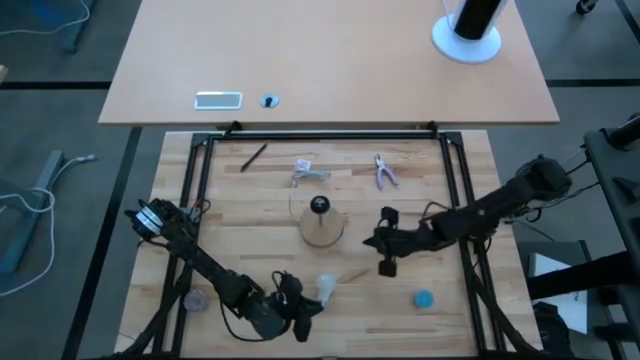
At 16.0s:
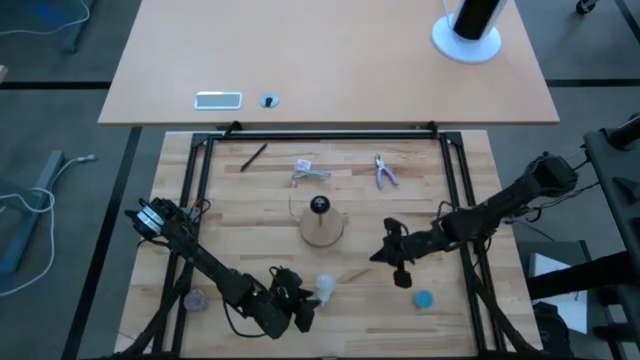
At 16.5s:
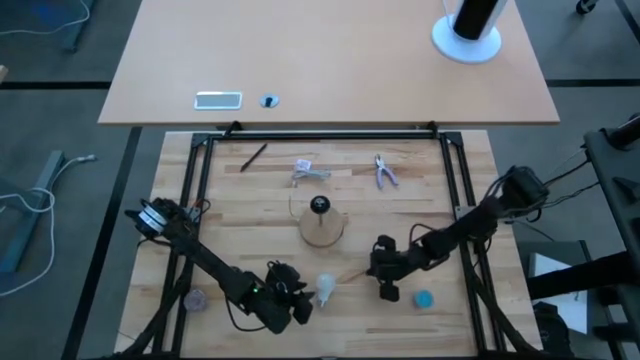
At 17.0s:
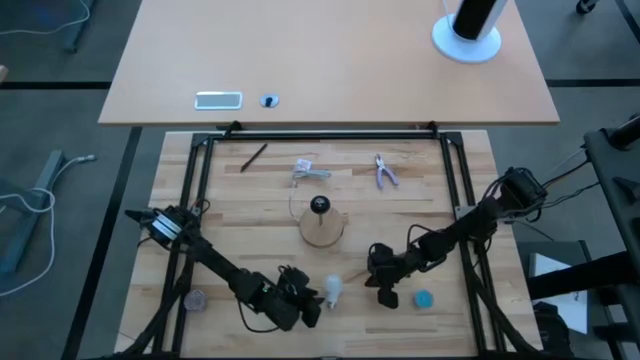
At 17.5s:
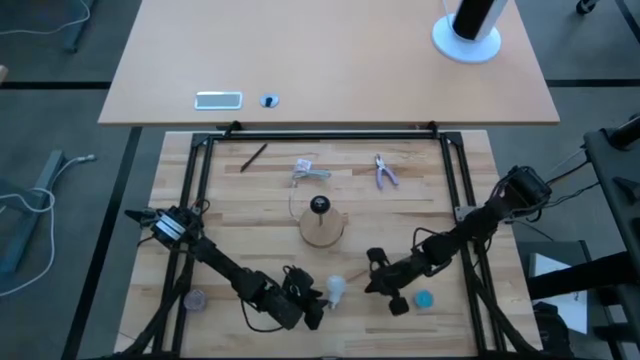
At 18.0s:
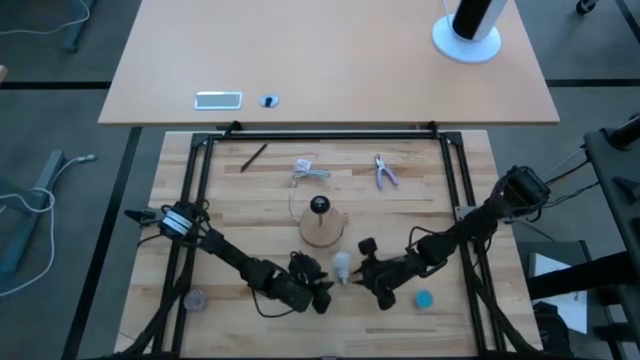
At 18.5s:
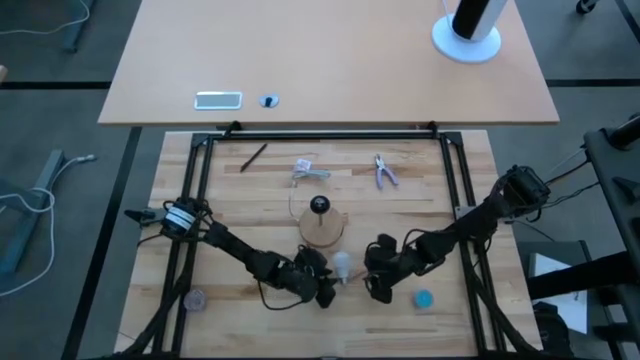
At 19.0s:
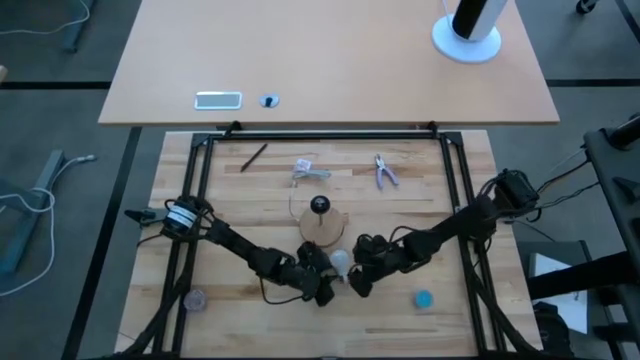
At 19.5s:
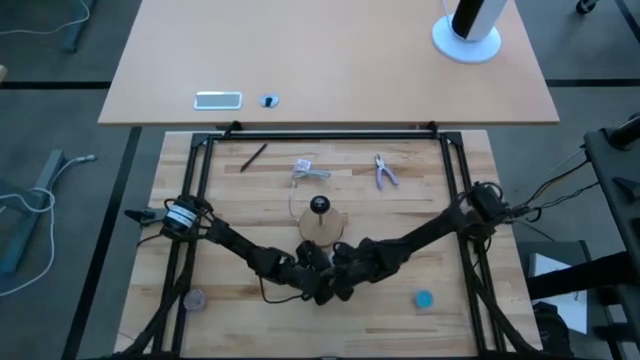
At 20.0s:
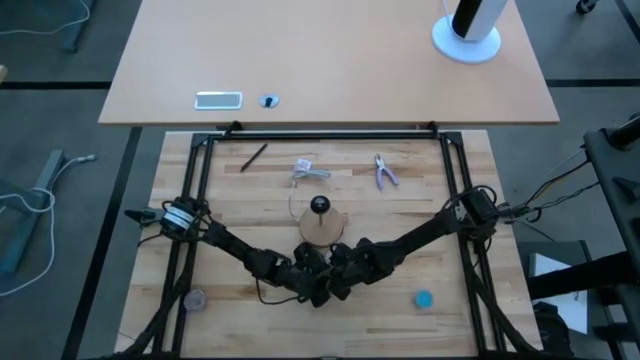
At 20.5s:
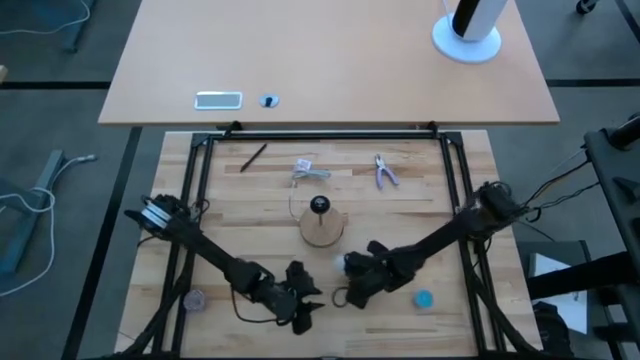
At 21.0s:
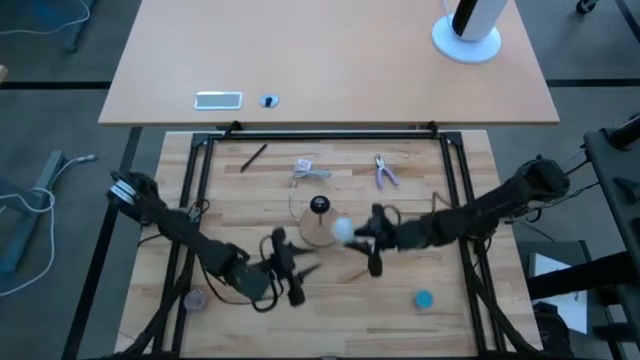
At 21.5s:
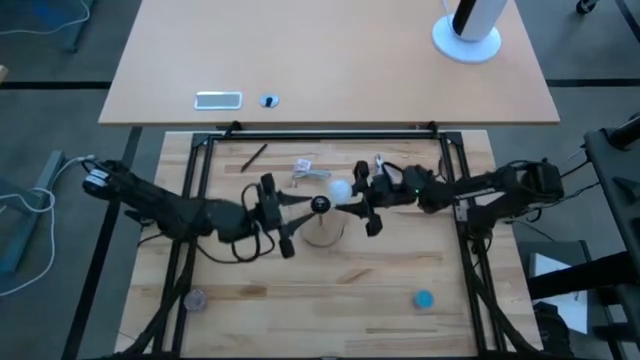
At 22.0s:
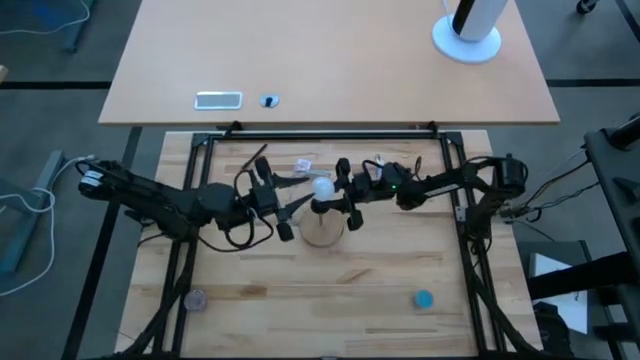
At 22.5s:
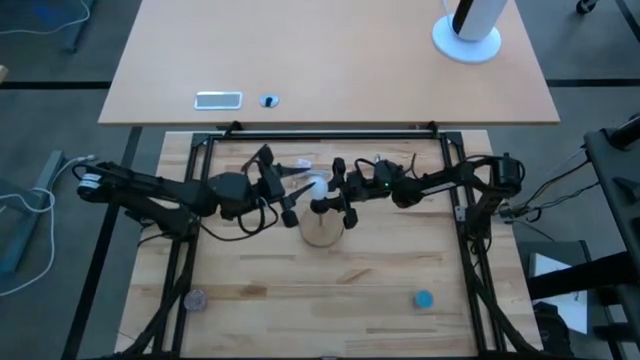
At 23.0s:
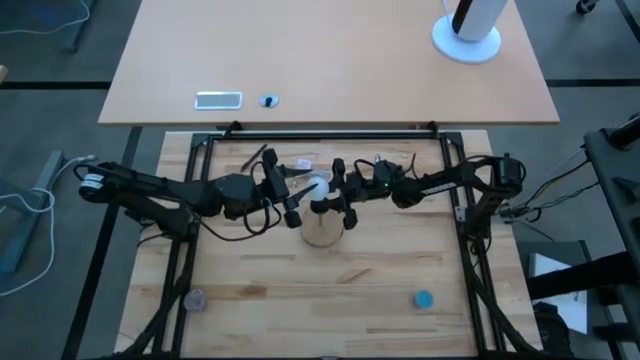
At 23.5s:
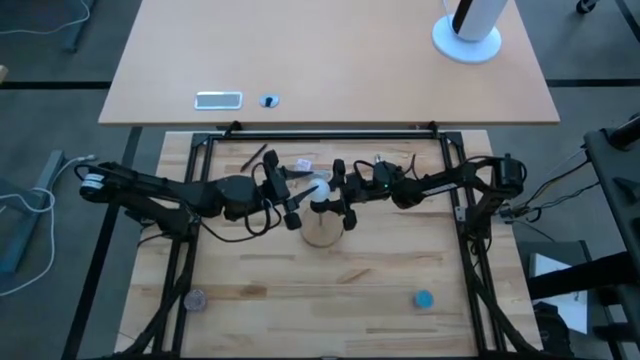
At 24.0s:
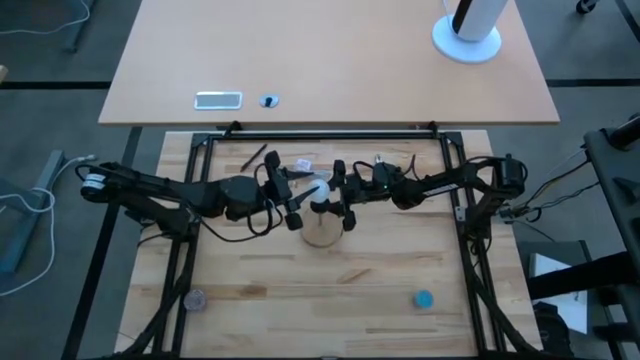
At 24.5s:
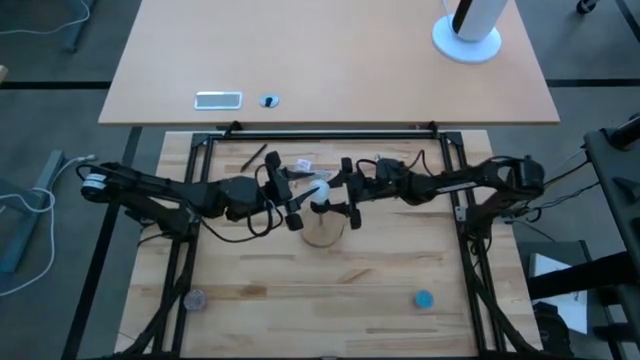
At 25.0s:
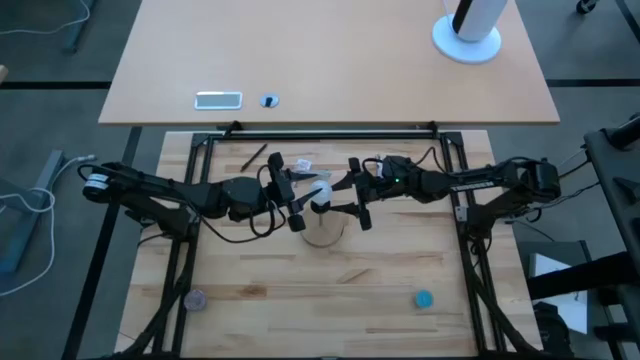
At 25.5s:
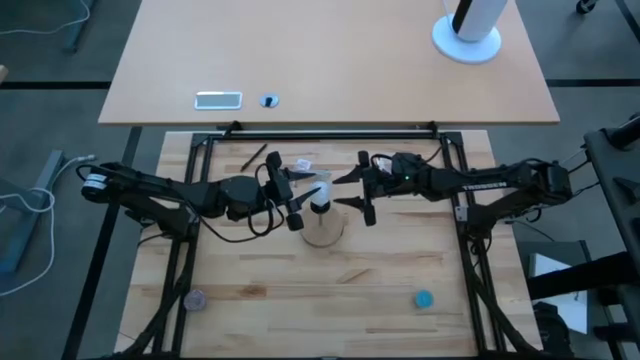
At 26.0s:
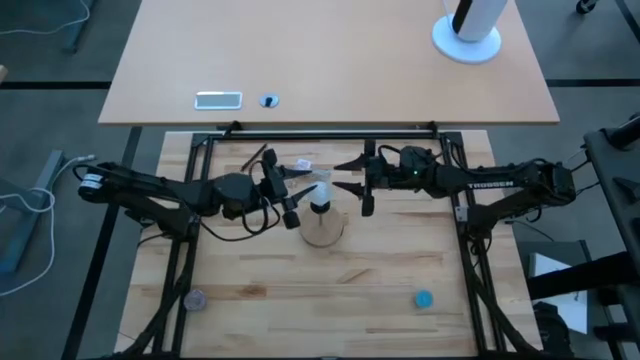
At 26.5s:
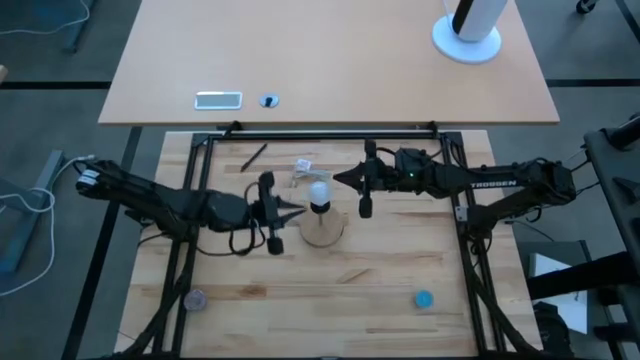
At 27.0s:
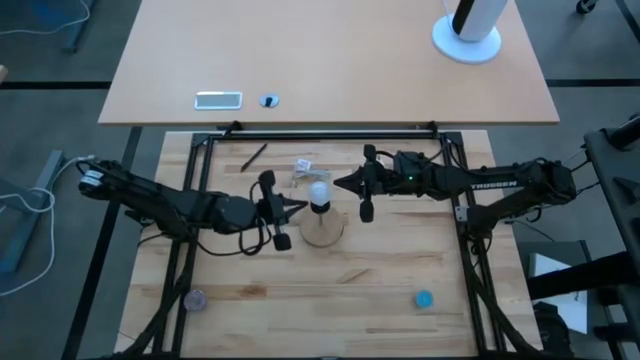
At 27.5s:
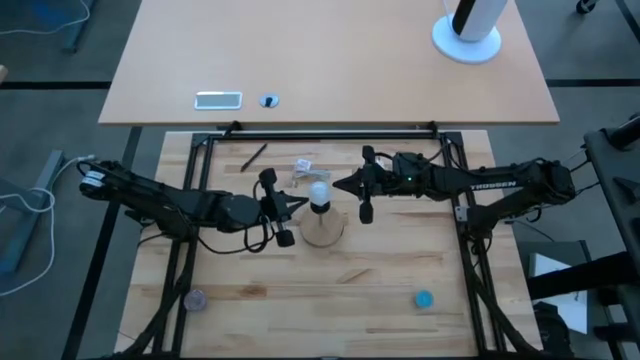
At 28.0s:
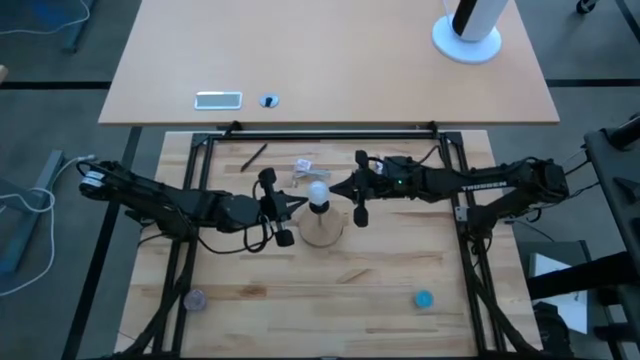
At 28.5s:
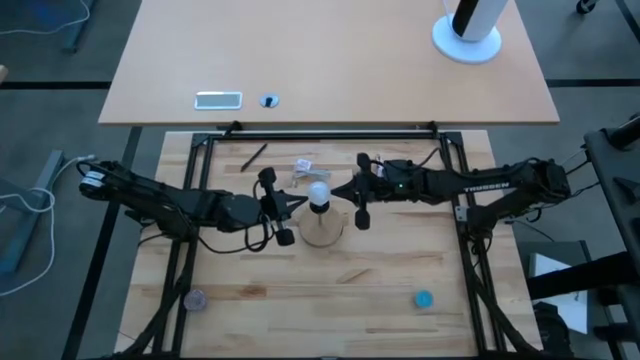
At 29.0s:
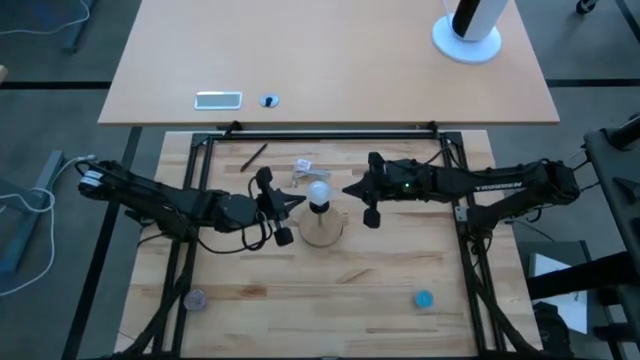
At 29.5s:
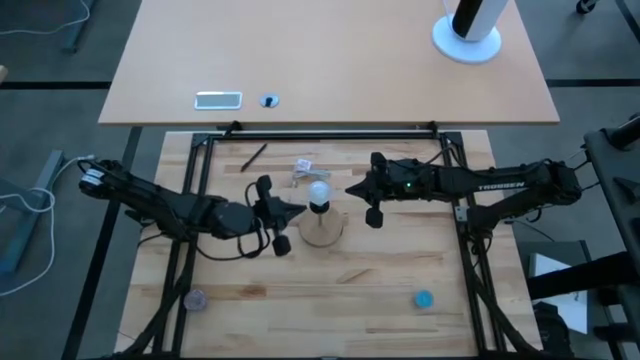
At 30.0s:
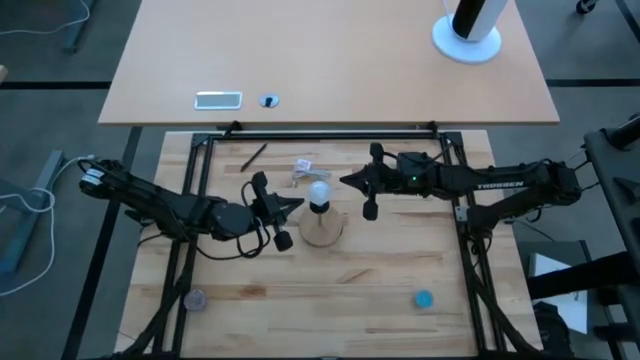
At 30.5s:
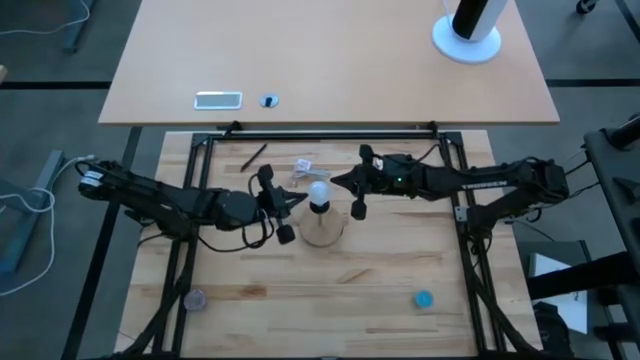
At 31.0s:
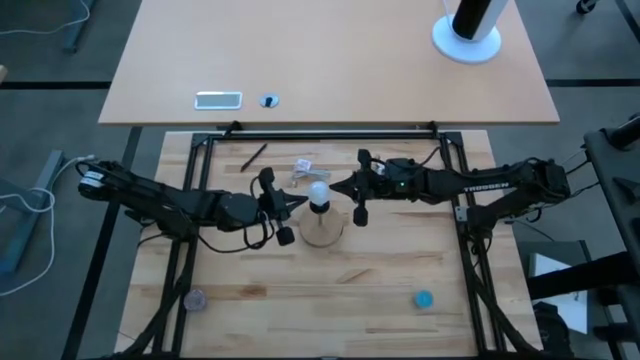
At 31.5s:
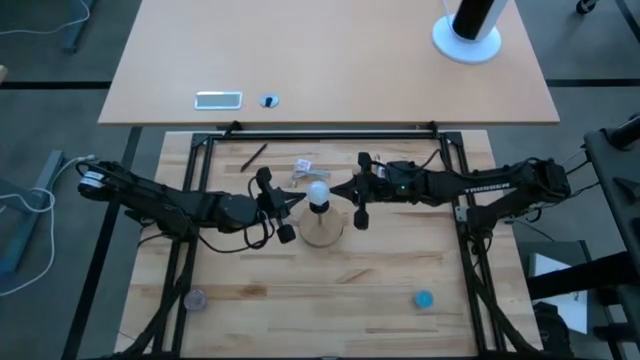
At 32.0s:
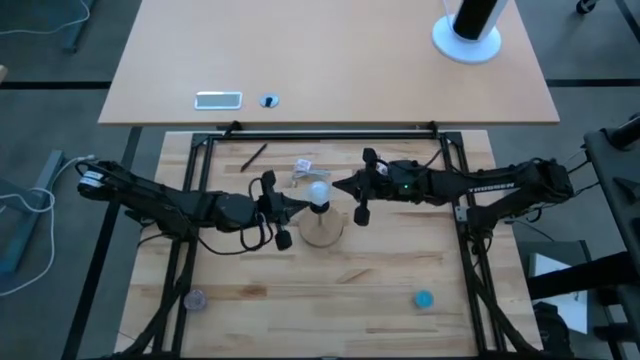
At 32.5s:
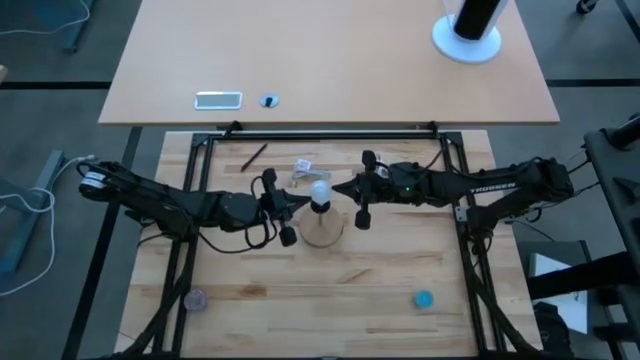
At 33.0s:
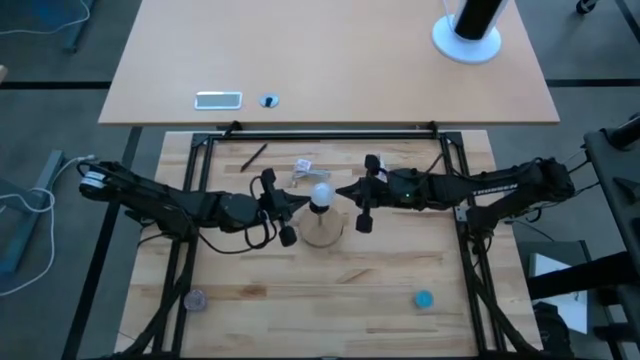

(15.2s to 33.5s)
Task: Screw lightbulb
Insert the lightbulb into the brown lamp

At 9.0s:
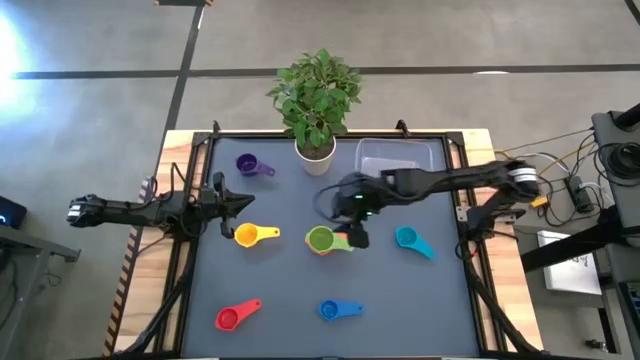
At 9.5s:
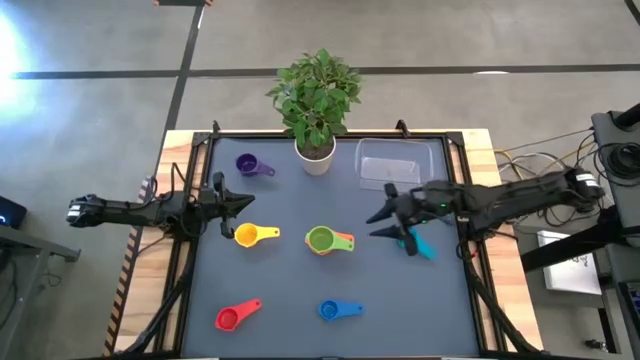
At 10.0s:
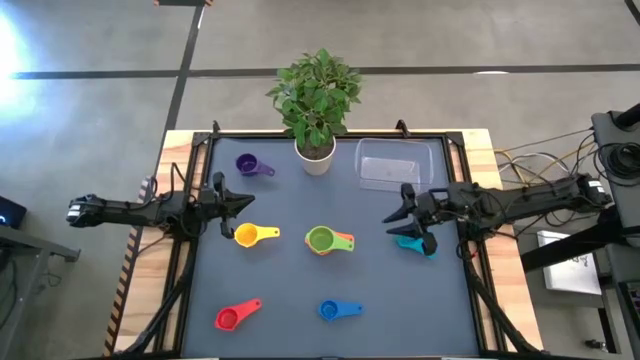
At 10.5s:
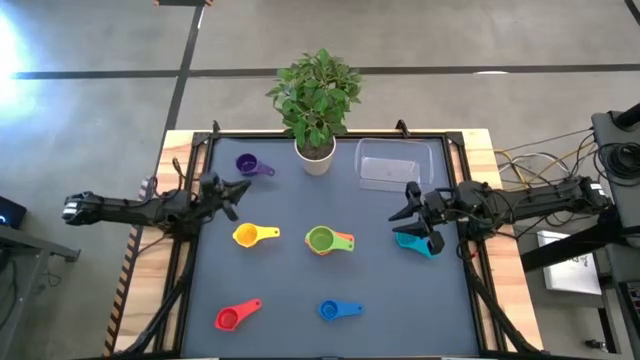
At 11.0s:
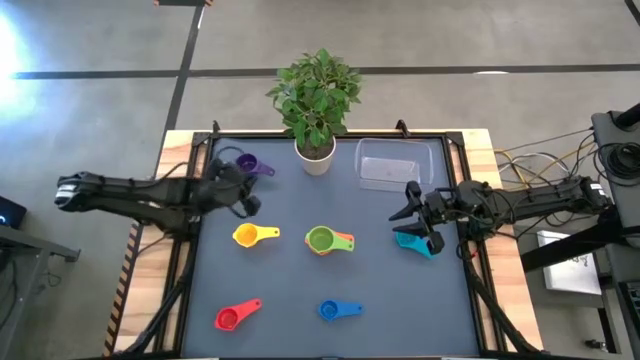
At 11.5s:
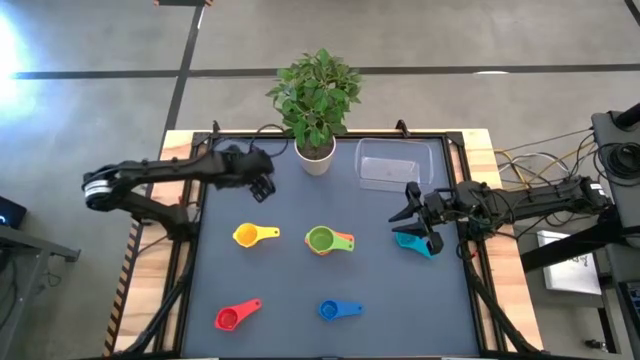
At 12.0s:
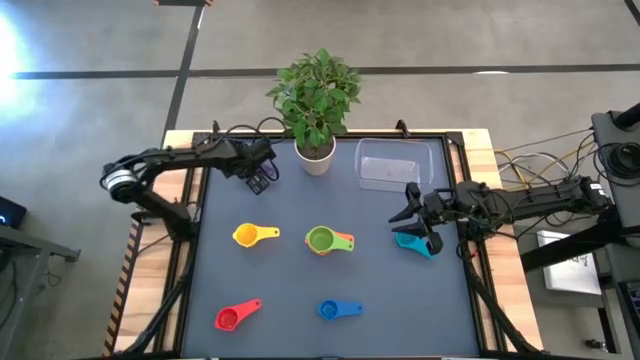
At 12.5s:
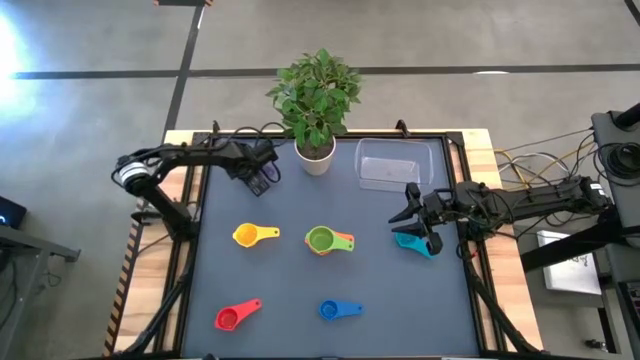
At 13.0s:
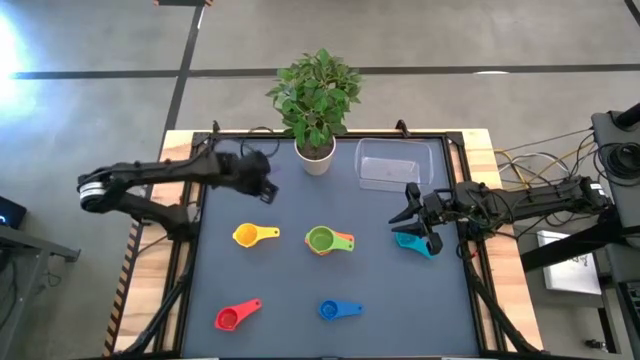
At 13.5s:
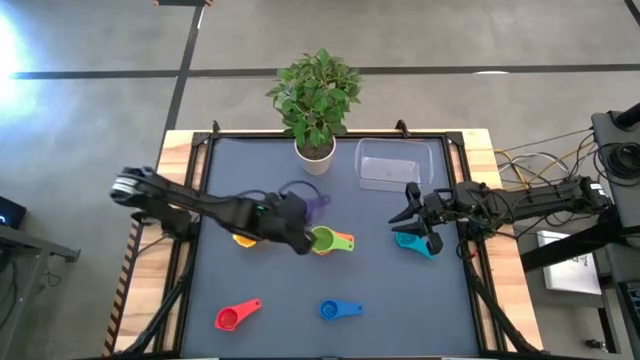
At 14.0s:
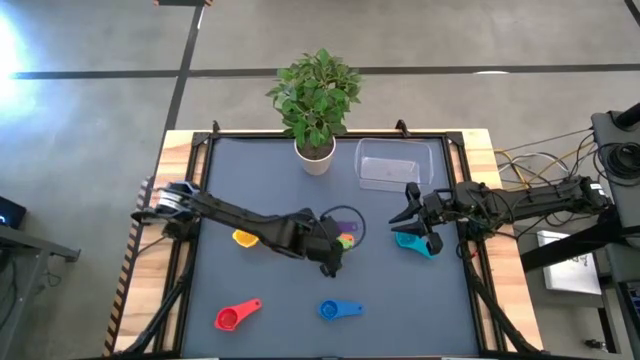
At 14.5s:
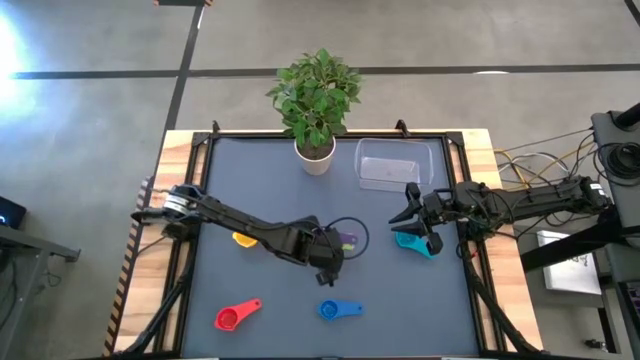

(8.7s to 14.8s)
Task: Nest measuring cups in basket
Stack the violet measuring cup on top of the green measuring cup
